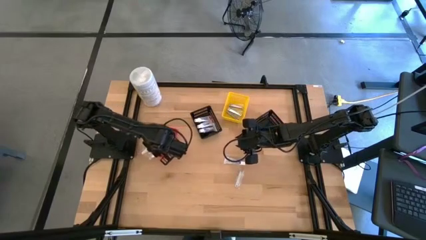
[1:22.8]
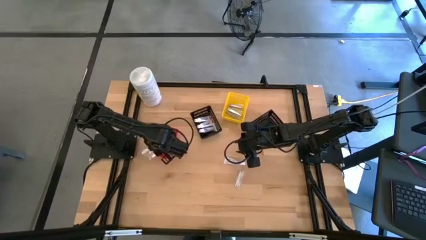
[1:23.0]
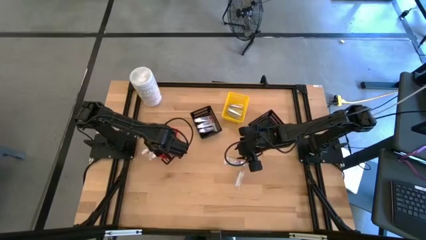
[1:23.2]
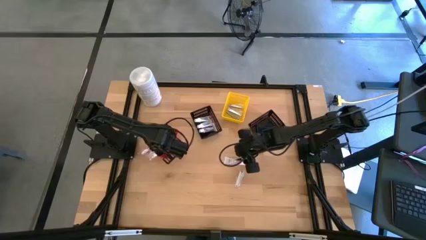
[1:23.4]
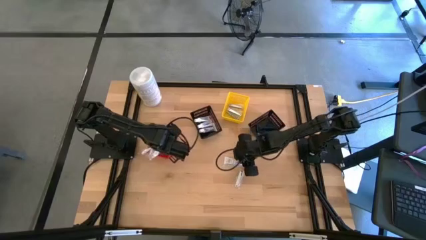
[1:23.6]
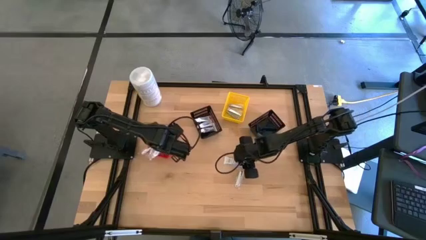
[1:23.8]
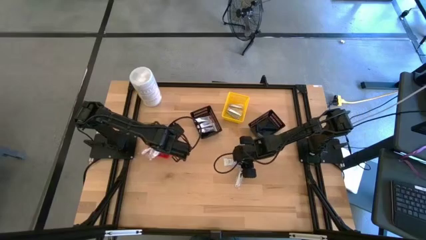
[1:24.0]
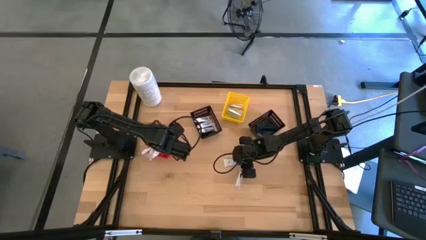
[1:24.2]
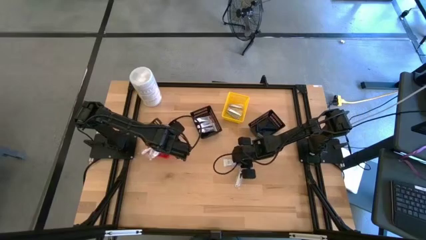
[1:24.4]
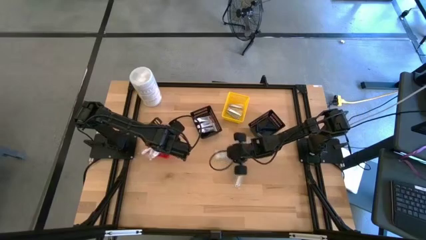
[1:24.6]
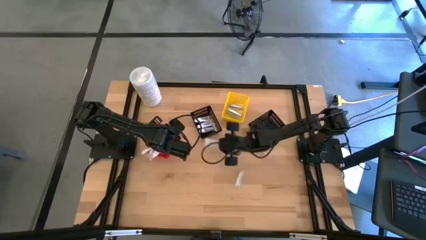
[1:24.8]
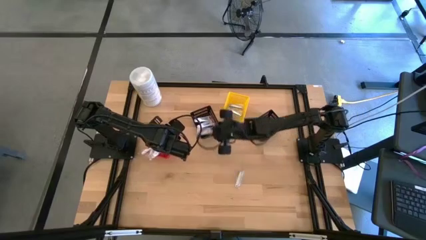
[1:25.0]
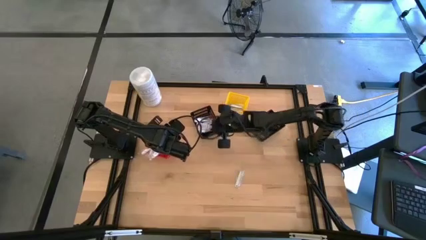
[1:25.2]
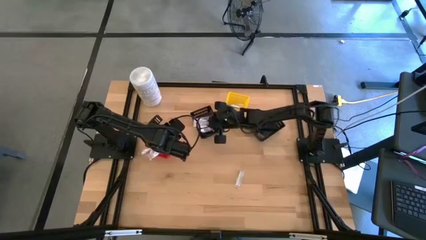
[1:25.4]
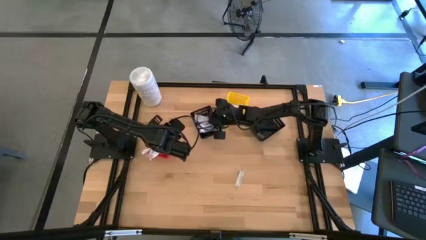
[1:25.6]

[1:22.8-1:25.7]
Task: Pick & Place Travel size toiletries
Put the toothpaste into the left black bin

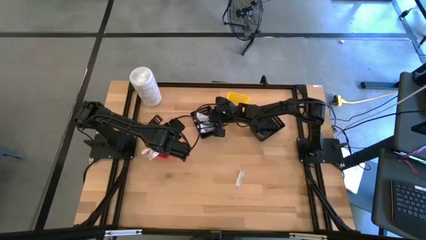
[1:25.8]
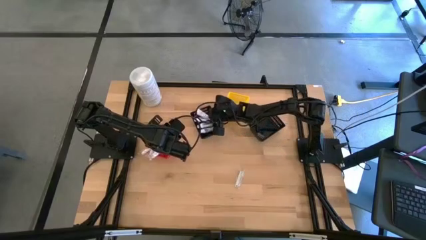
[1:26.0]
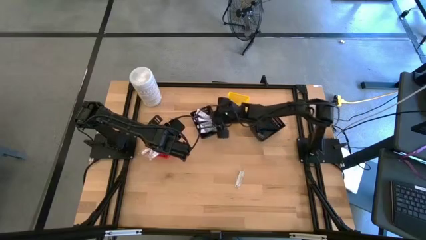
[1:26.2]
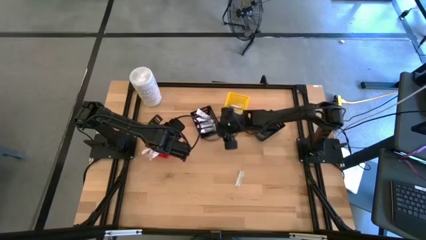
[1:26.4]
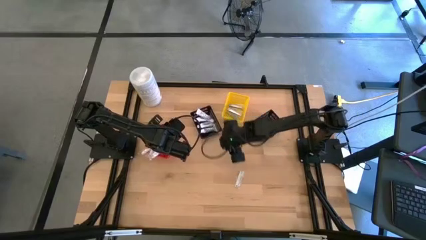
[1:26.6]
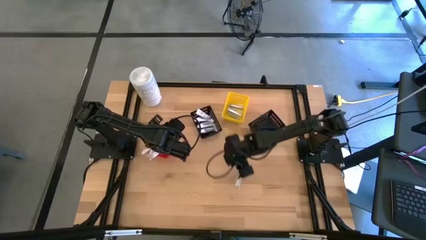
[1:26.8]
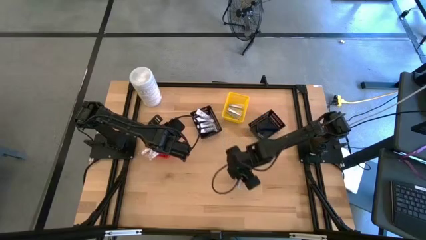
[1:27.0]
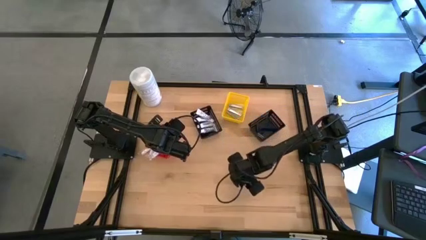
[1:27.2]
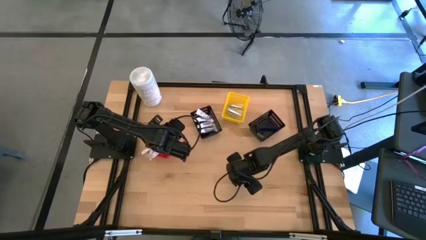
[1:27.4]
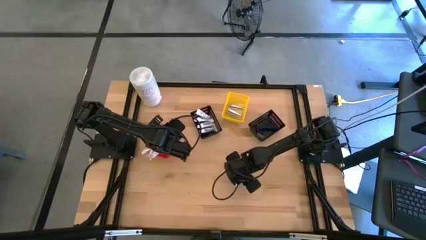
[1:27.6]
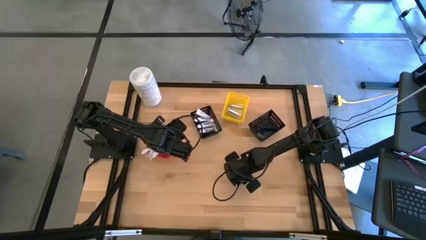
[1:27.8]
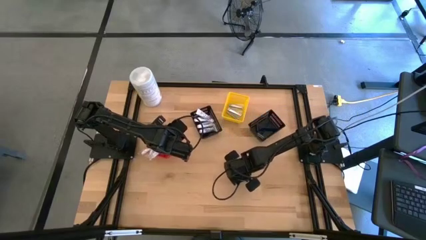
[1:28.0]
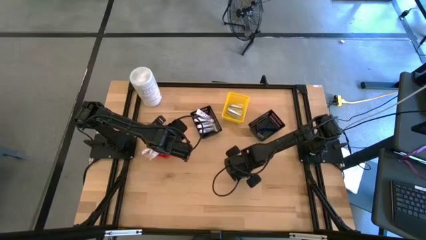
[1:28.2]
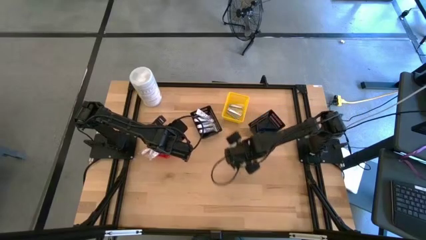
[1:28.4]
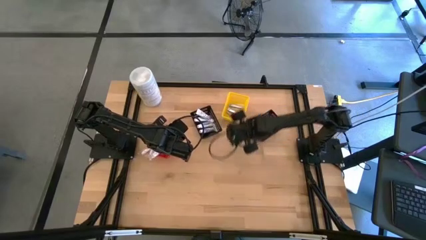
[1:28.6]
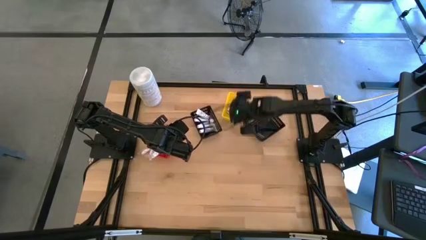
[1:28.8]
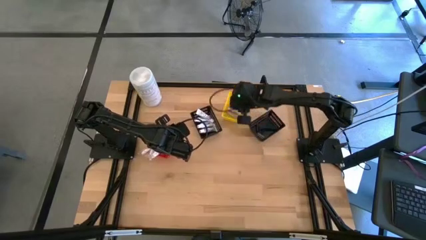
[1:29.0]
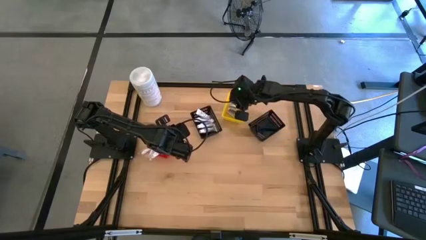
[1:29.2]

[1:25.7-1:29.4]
Put the nail cutter into the yellow bin

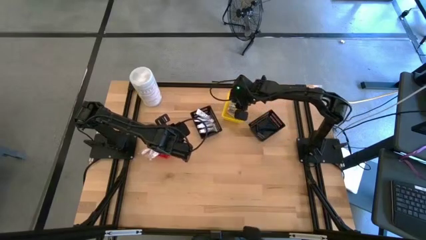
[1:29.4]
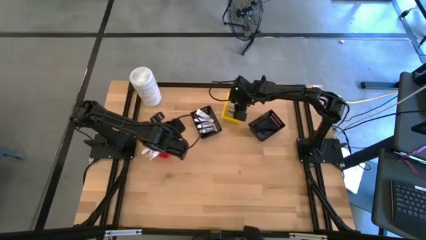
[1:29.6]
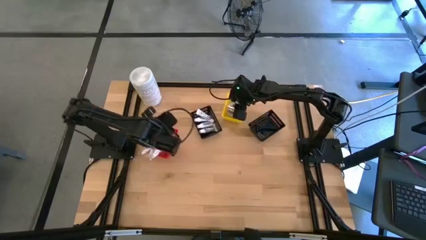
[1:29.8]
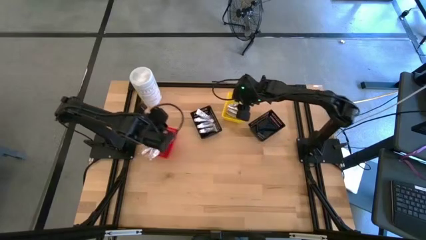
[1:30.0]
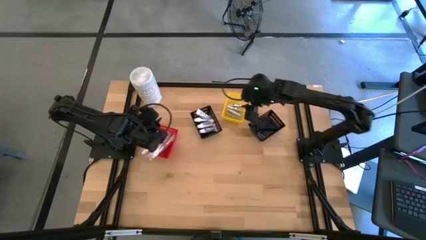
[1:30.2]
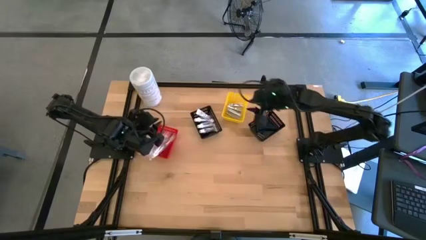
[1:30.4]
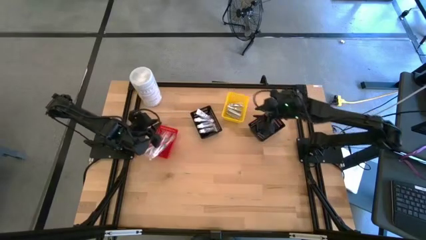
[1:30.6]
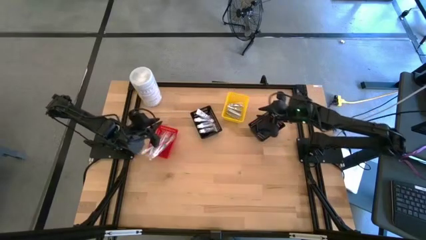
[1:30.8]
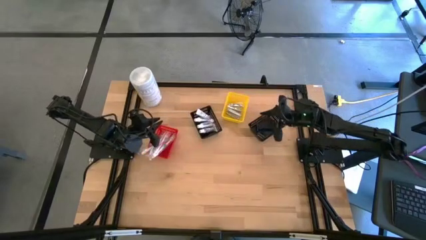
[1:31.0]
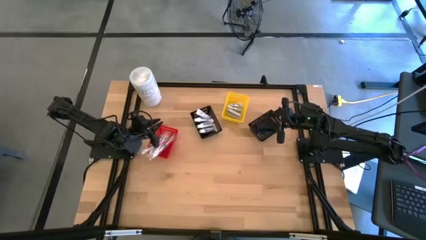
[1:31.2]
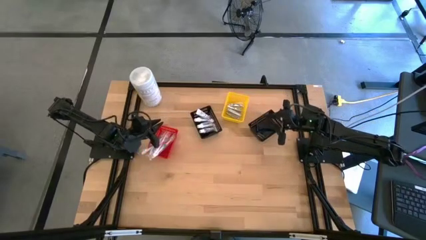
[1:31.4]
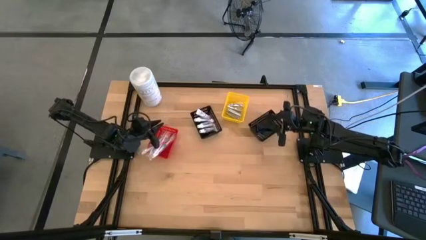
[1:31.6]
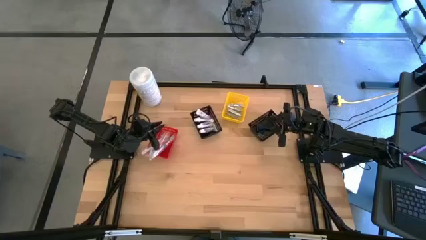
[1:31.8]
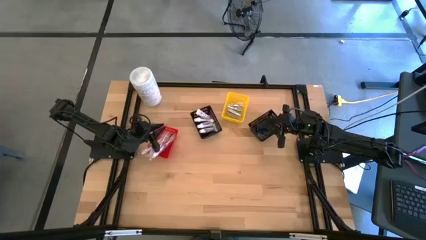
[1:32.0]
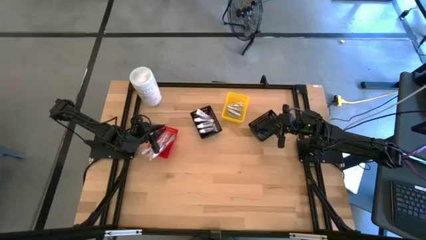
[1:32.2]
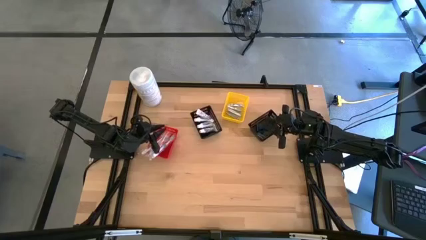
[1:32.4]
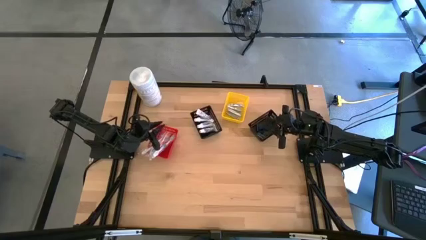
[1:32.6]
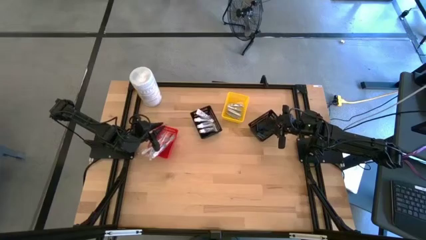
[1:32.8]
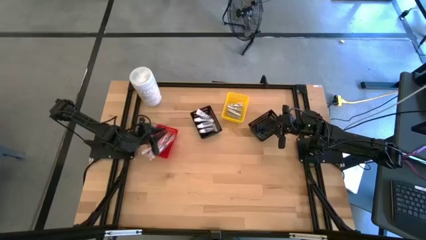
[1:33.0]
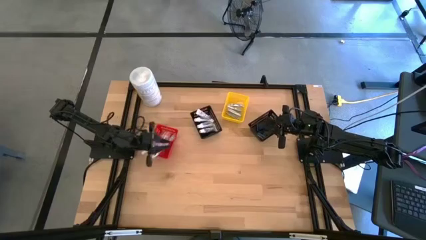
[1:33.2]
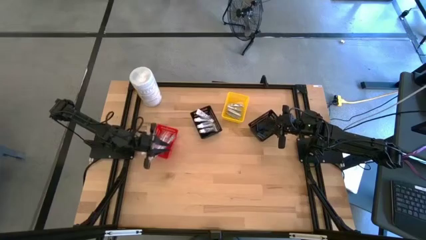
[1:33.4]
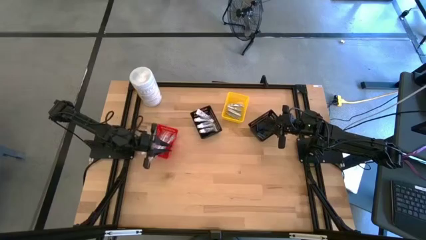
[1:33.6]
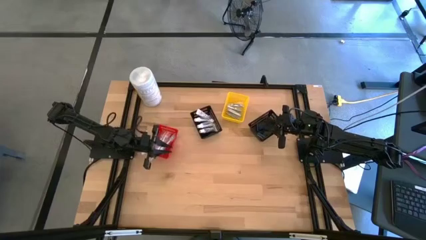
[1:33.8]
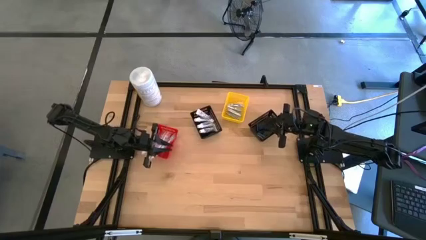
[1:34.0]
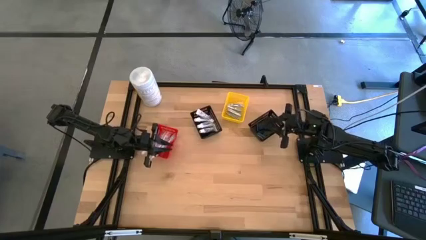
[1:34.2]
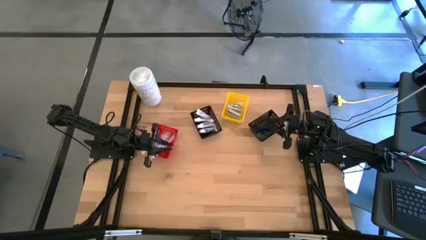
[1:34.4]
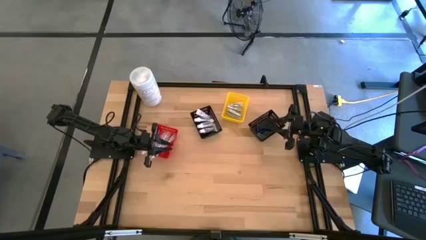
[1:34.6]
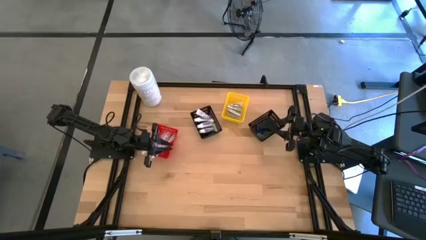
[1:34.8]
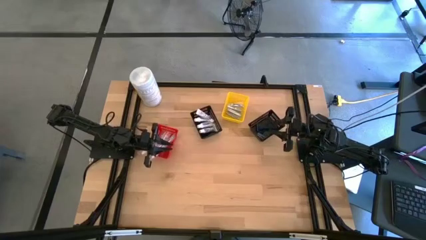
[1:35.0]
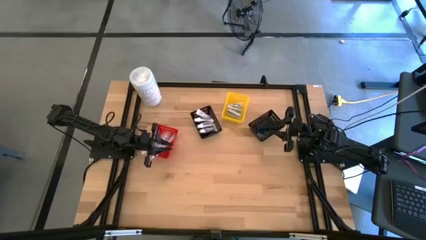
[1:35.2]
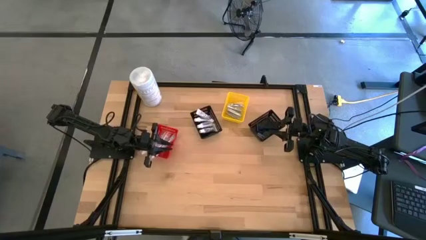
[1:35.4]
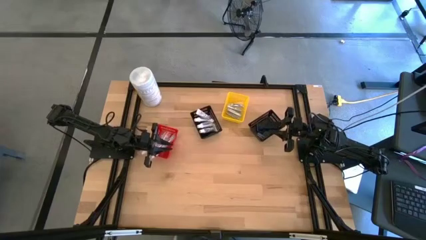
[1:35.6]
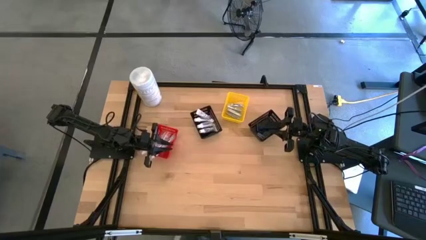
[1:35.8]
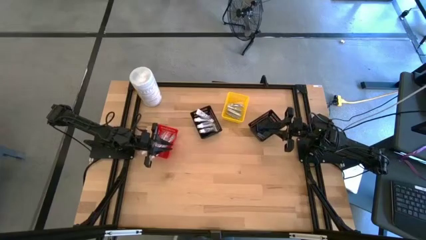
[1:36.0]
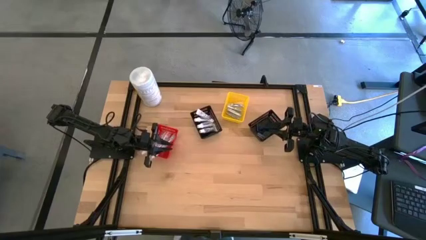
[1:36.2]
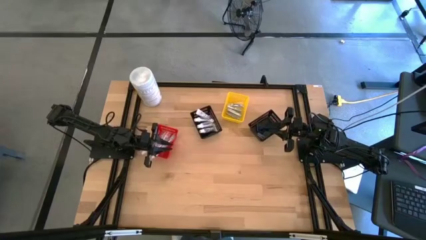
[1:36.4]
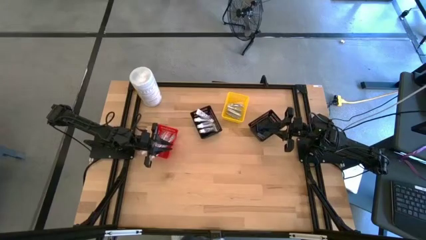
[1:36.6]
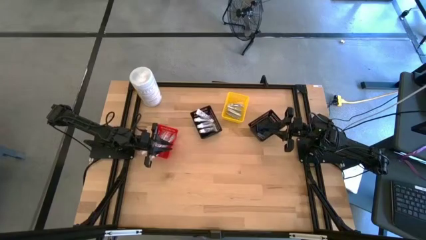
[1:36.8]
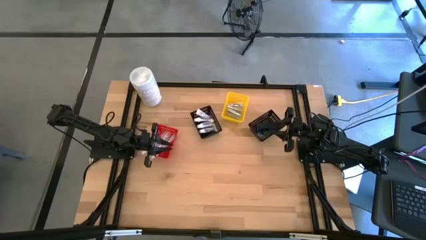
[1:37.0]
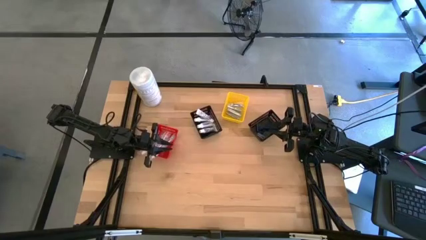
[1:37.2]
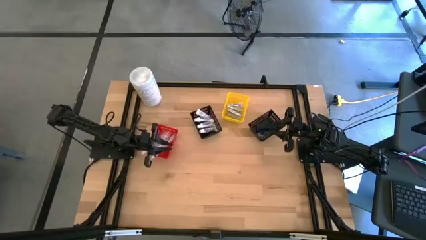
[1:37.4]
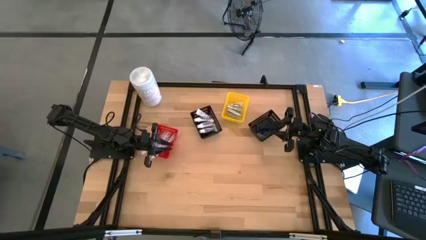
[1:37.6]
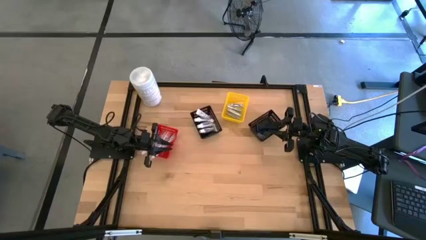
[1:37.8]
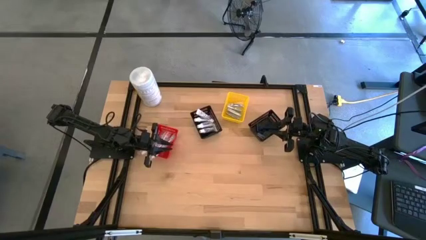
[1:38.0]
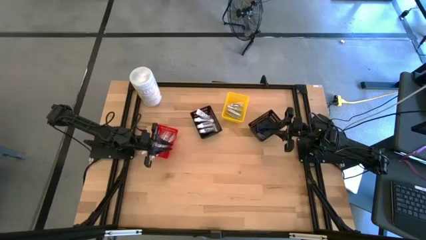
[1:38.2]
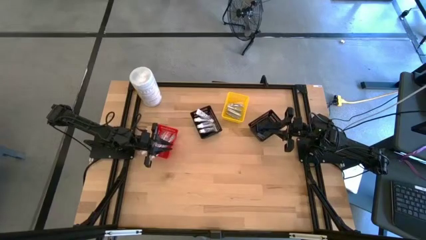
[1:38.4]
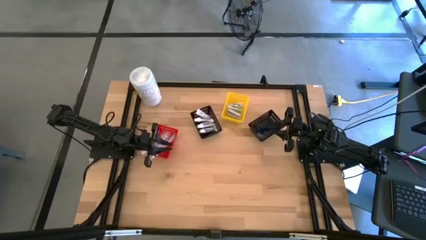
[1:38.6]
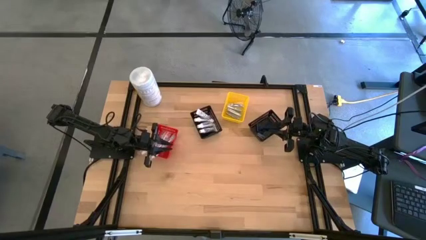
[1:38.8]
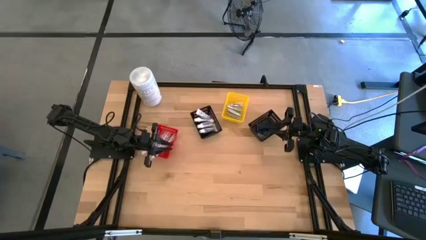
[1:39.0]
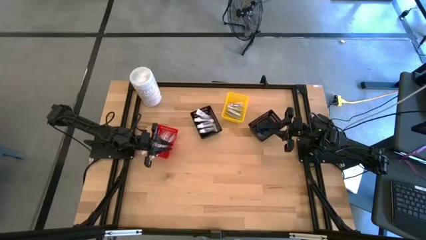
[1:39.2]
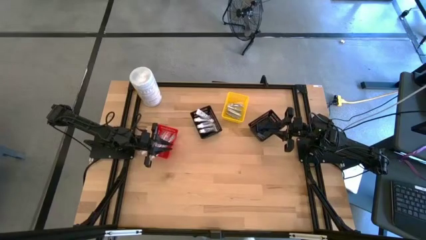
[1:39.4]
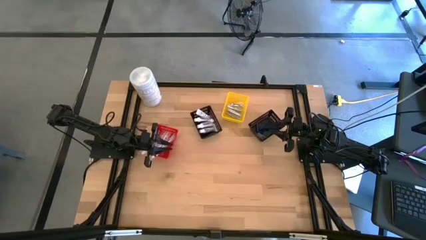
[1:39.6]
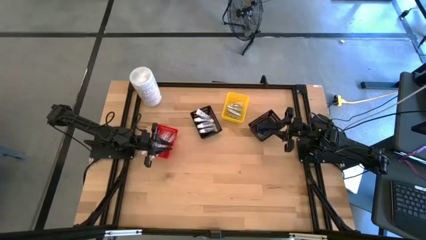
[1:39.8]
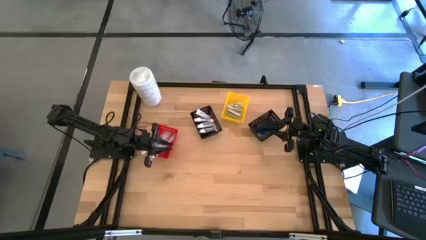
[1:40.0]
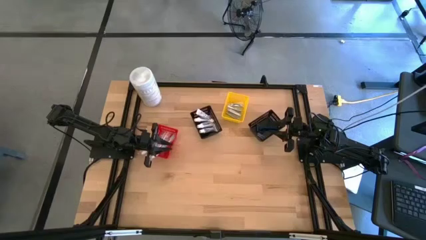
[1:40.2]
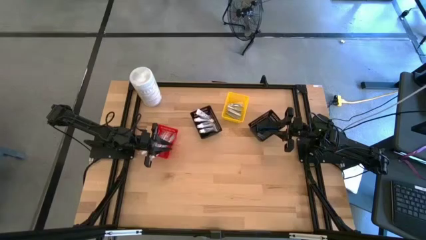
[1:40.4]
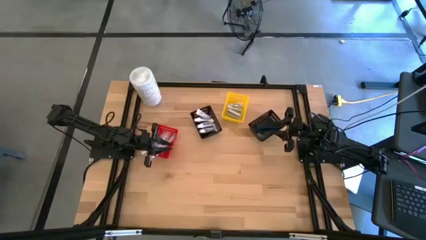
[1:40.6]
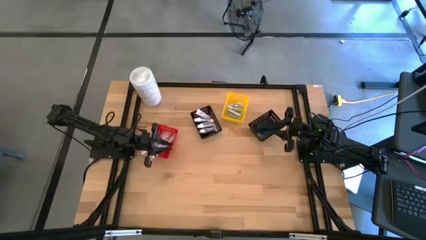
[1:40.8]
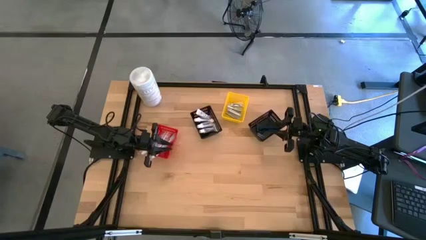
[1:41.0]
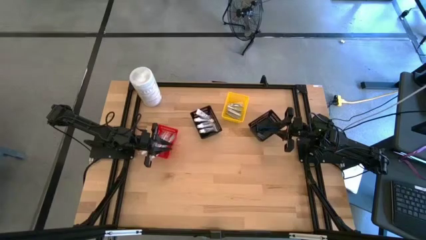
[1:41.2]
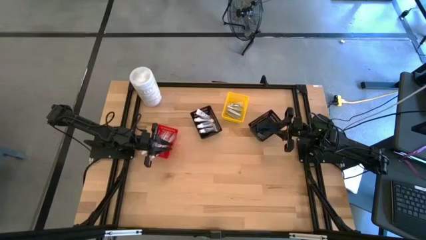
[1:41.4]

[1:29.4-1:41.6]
Return to Home Position
